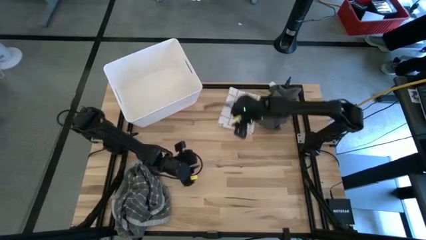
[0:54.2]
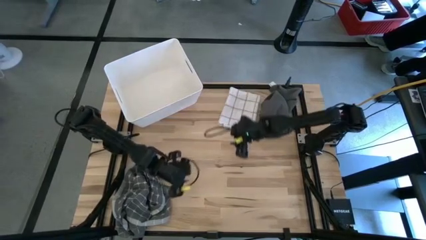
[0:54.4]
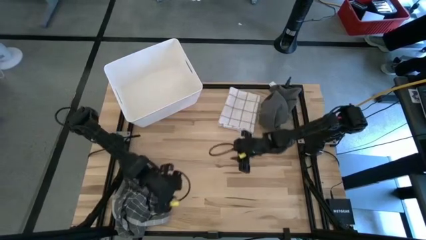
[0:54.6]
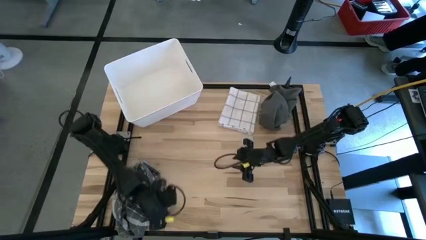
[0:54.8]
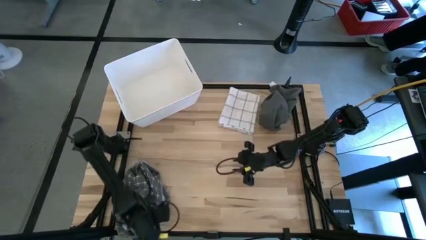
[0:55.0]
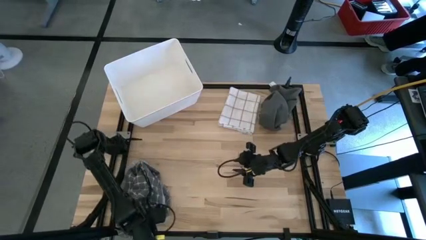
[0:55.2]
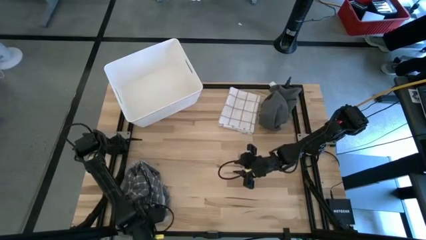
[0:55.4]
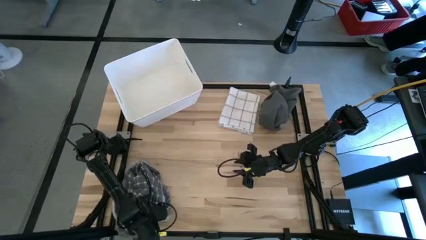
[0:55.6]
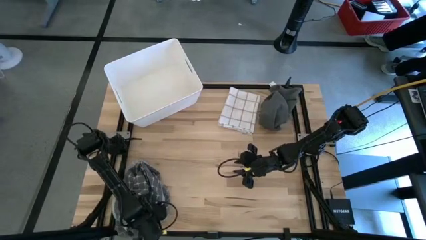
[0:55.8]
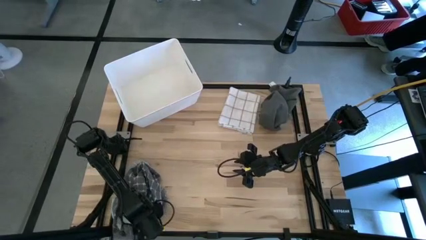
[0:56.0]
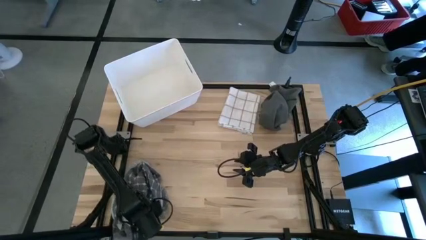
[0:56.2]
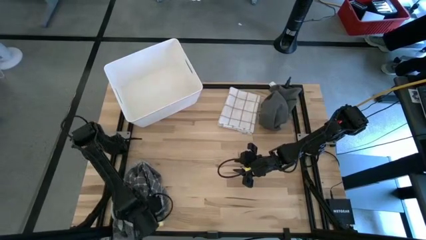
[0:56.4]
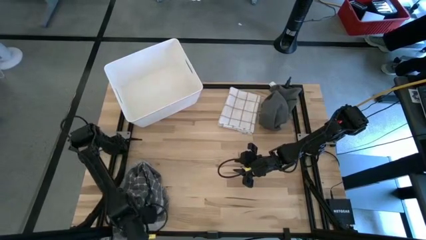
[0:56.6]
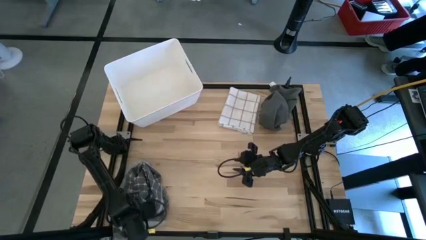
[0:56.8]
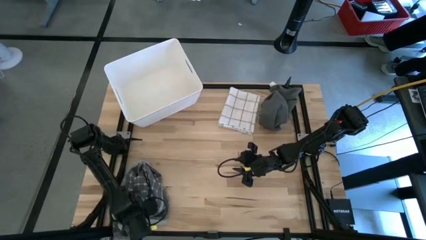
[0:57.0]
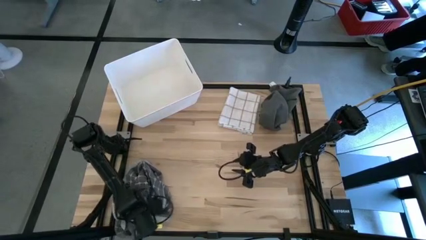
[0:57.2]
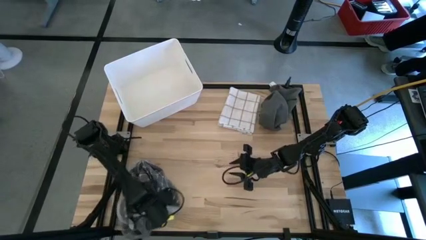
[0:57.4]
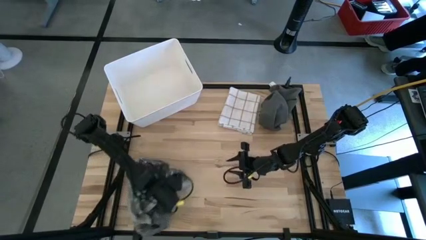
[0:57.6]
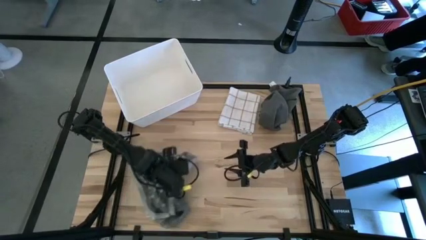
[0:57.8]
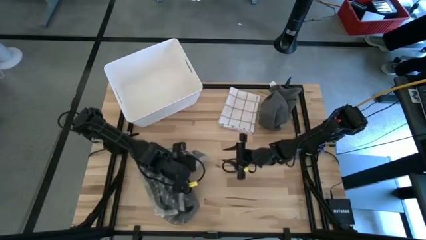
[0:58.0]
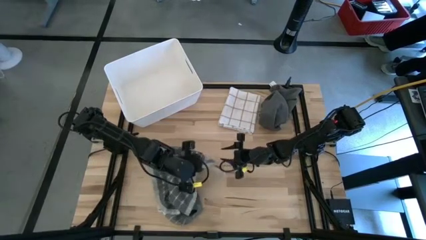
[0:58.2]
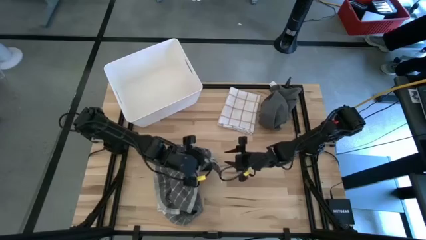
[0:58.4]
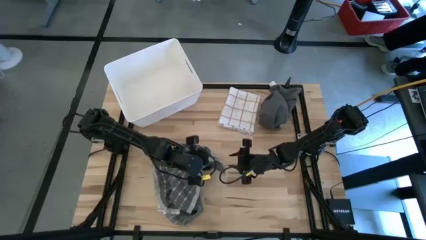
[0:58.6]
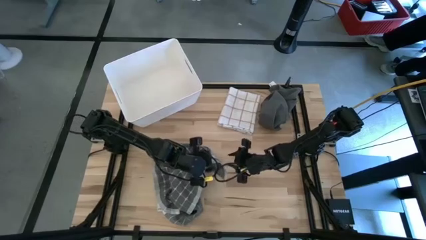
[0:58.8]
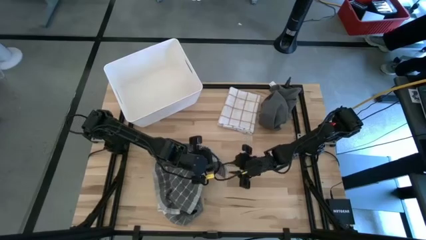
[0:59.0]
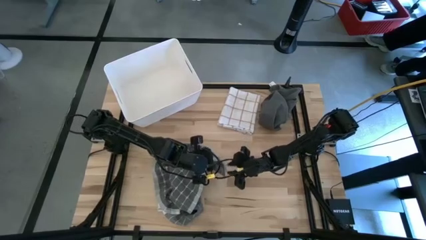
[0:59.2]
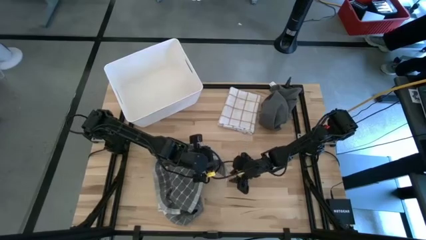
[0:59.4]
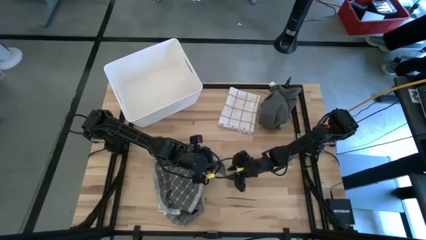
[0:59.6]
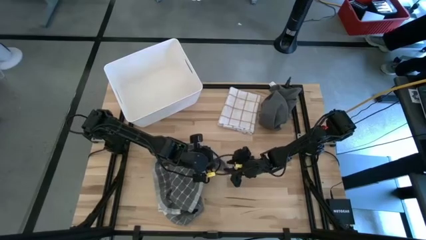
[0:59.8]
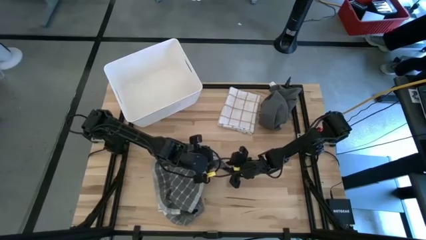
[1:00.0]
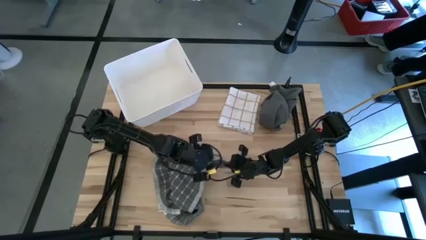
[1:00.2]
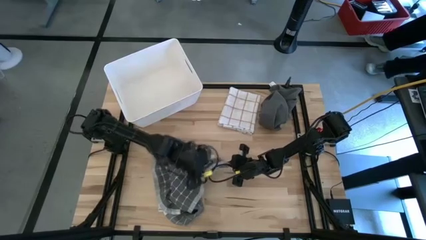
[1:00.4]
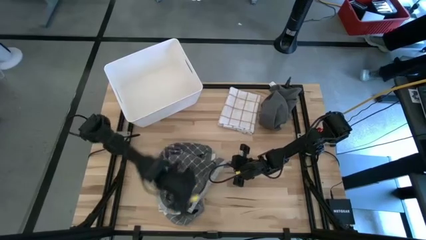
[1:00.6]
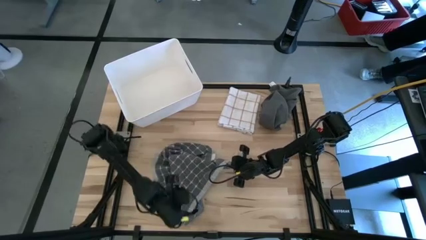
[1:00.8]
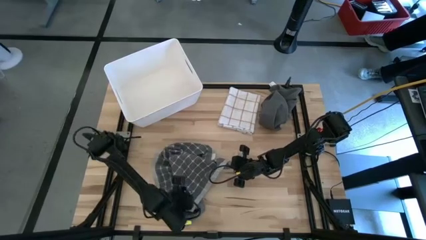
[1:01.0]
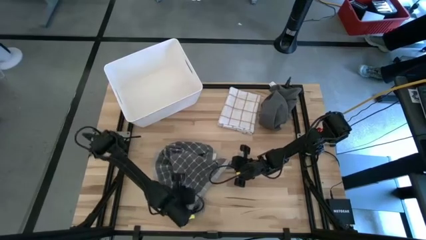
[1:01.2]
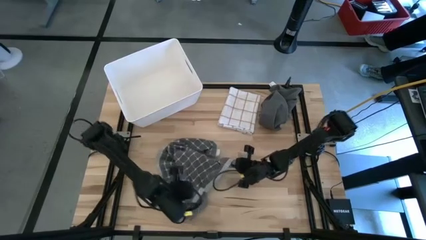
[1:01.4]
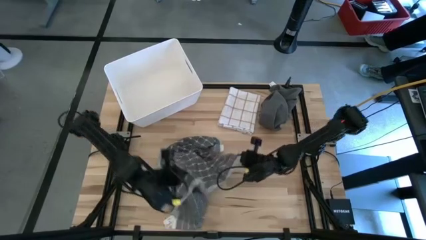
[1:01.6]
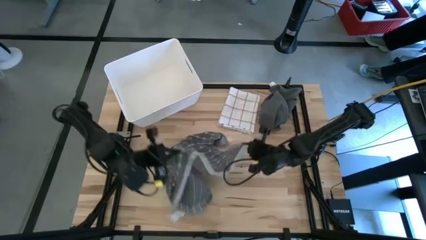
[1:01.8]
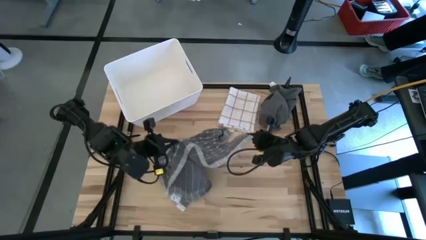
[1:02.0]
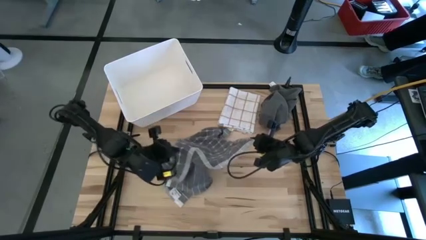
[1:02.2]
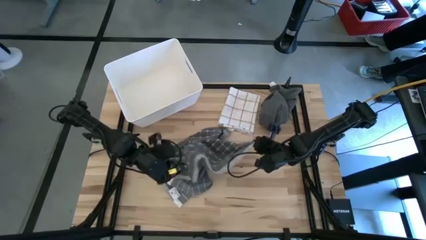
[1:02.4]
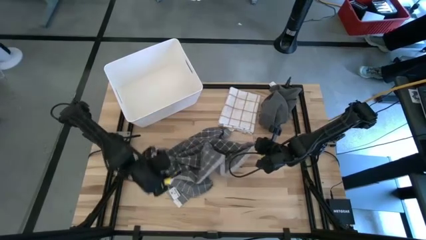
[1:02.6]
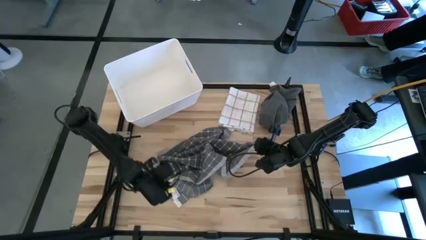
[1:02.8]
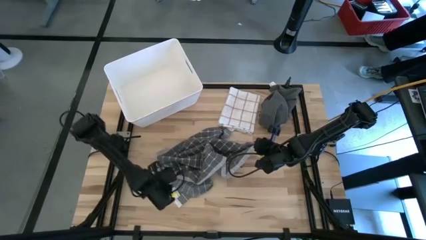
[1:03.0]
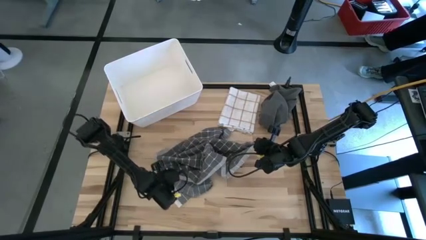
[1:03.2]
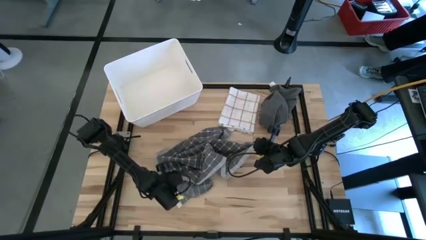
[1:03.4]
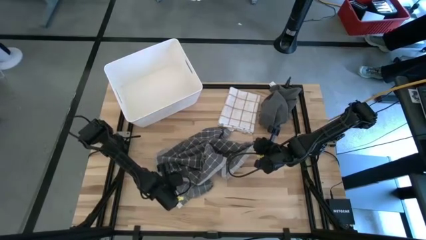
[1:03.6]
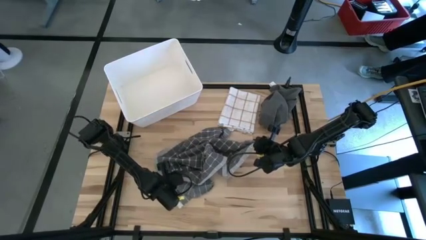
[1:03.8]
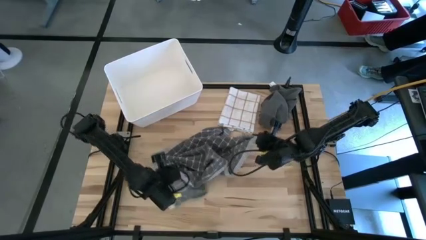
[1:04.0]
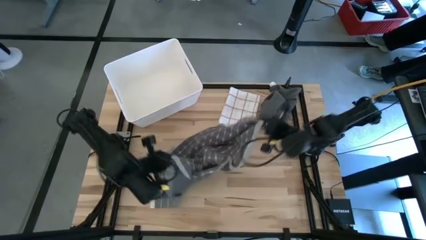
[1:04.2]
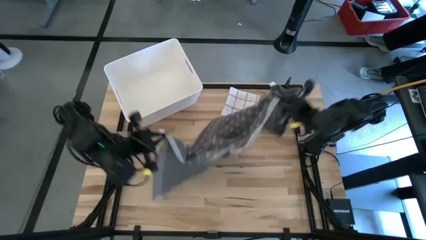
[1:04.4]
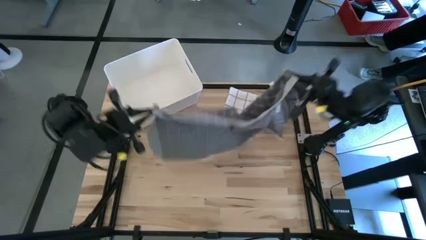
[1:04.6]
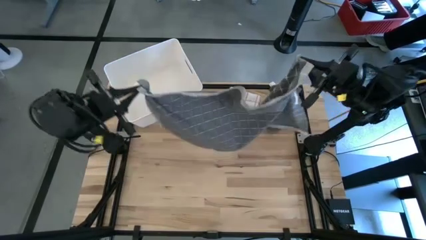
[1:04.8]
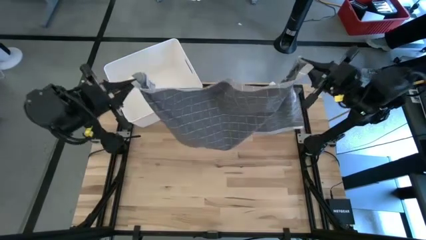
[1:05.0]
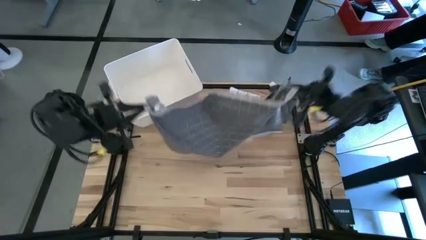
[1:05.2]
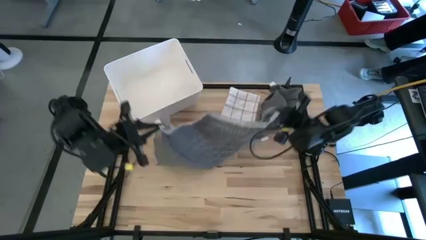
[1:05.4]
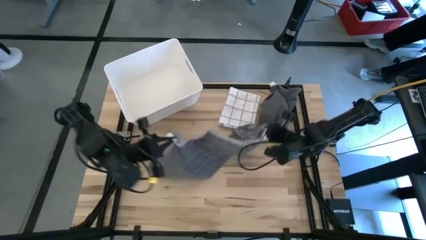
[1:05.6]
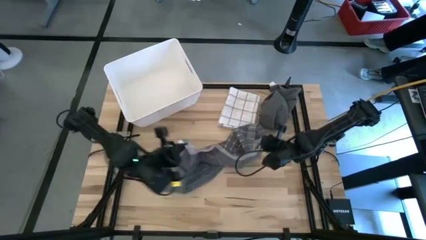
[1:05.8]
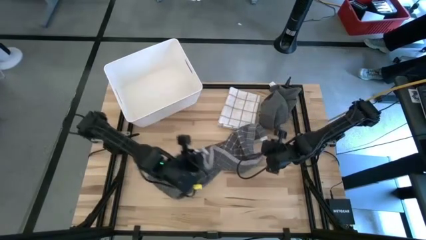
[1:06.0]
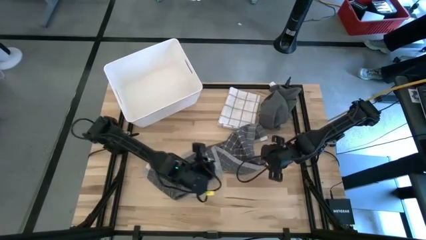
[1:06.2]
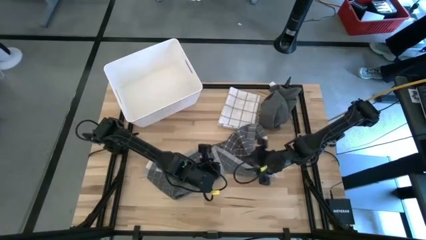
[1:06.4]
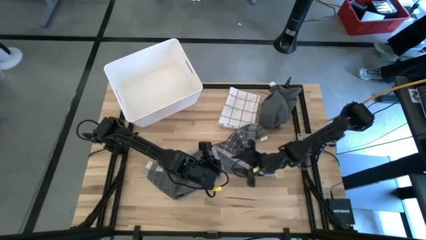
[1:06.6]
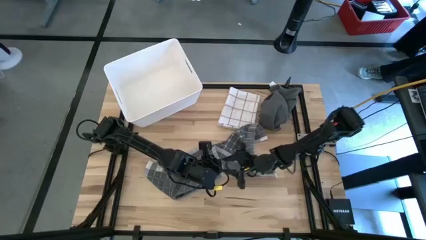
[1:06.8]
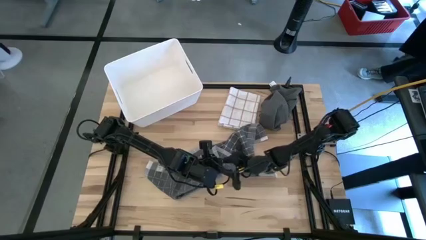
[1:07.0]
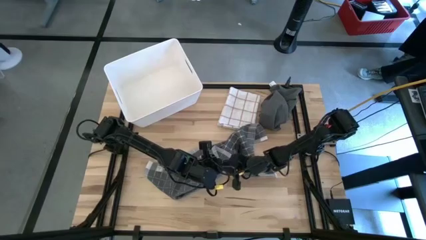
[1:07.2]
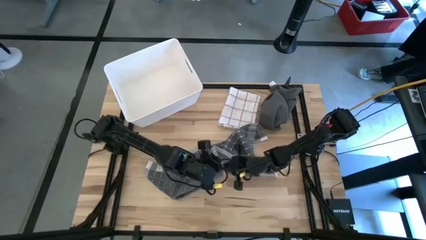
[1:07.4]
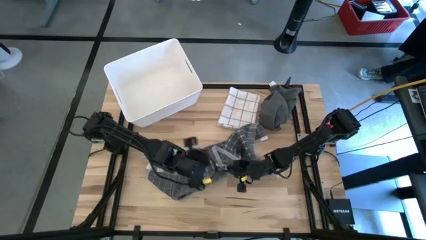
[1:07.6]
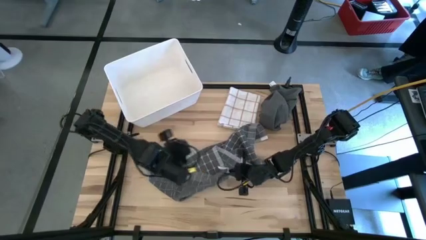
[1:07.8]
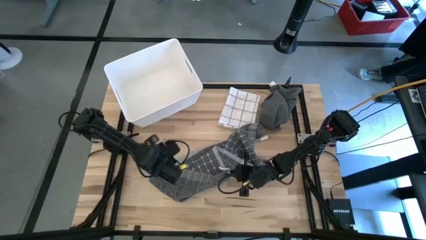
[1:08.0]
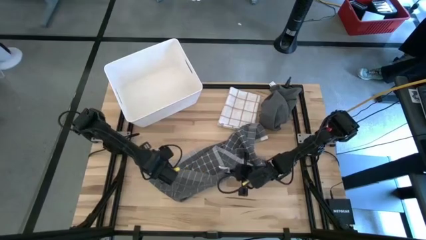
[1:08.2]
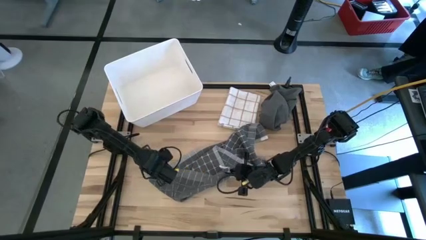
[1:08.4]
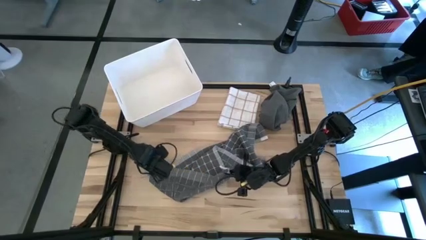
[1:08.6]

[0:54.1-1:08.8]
Task: Fold towel
Fold the gray checkered towel

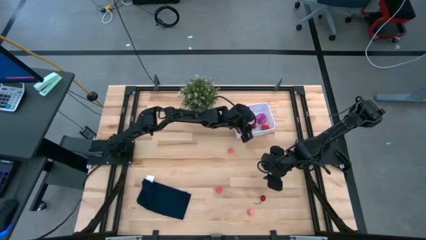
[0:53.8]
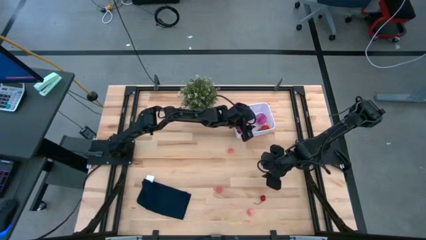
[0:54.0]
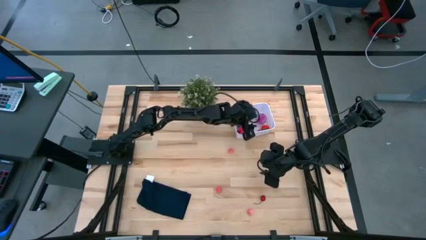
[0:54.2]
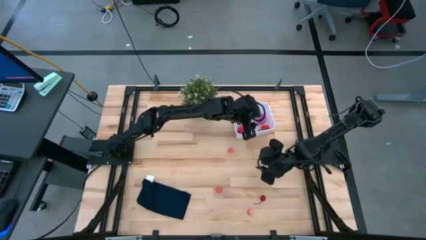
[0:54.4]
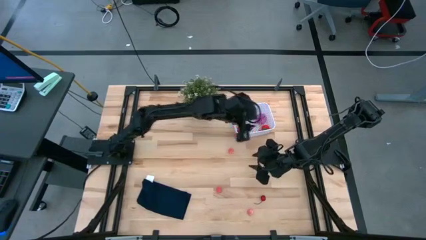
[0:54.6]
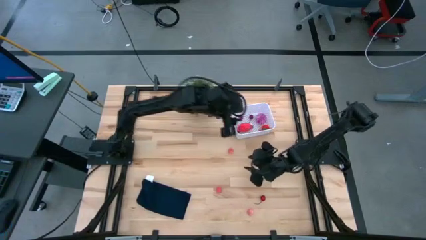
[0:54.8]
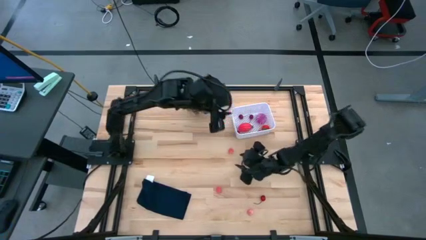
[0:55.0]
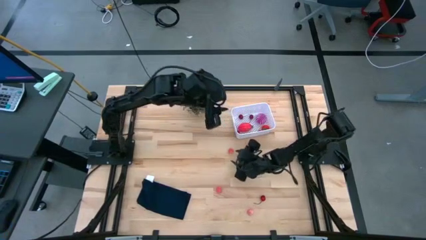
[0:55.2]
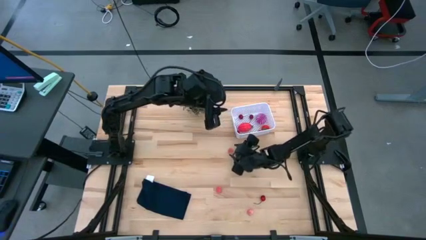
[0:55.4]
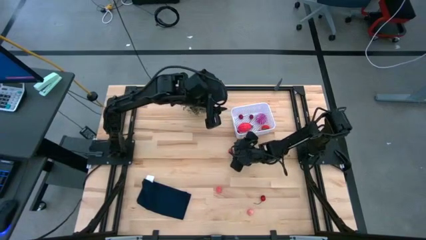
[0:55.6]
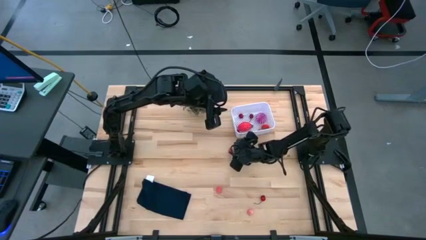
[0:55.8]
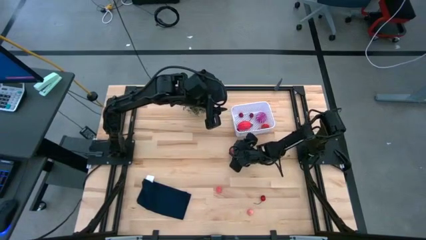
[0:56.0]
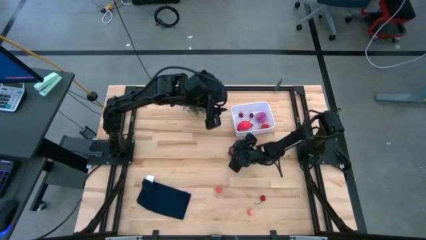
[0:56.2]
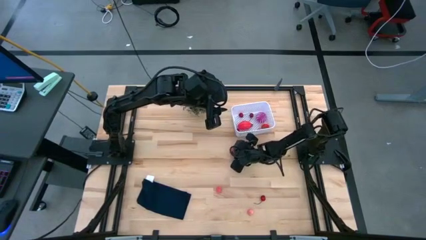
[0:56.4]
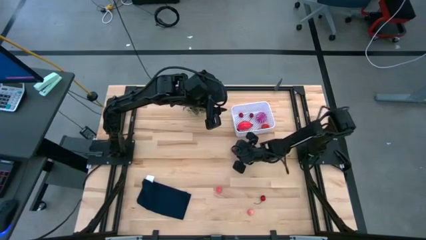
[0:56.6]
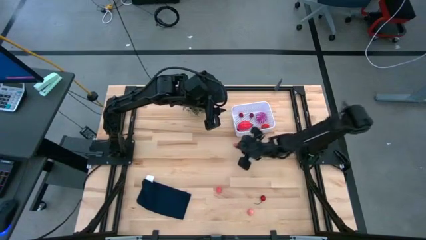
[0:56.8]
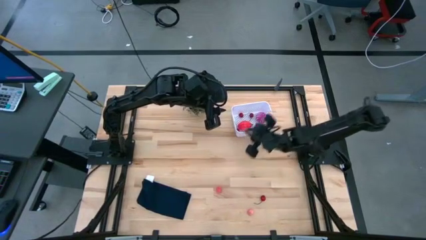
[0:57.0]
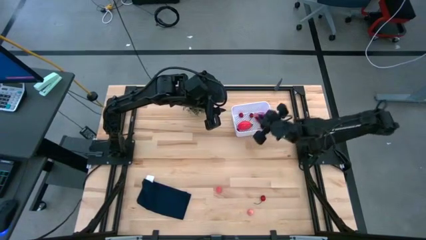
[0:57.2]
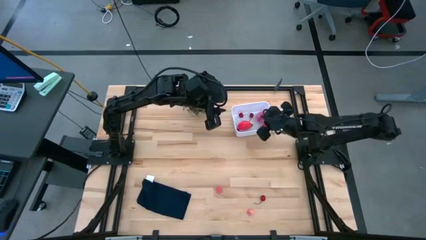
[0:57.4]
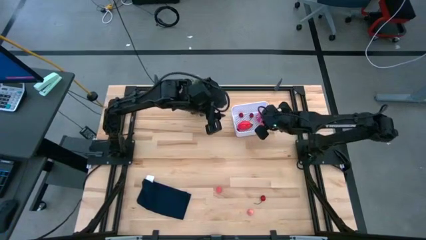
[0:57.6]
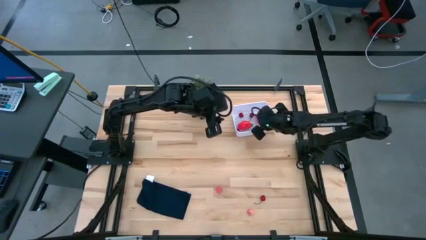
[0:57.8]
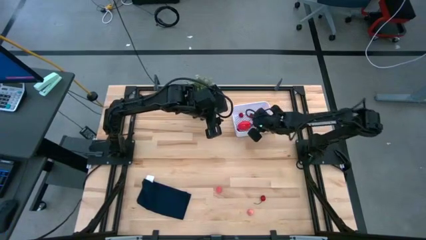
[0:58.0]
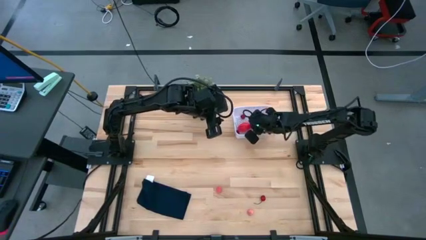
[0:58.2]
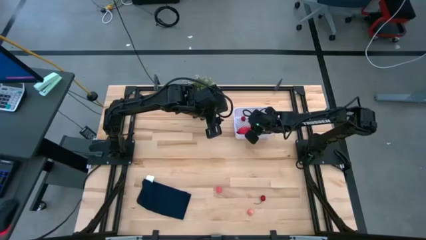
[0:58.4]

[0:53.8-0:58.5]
Task: Pick and placing Produce into tupperware
Put the top peach into the bin
